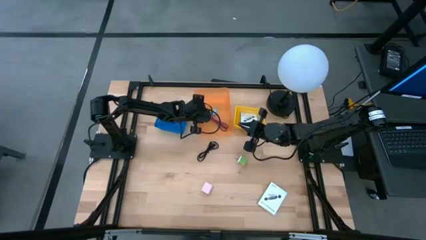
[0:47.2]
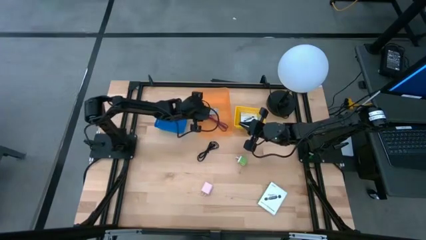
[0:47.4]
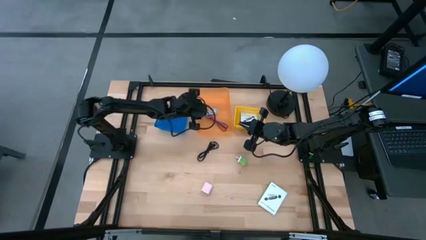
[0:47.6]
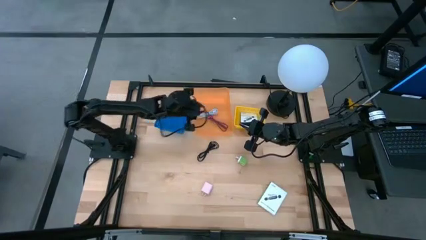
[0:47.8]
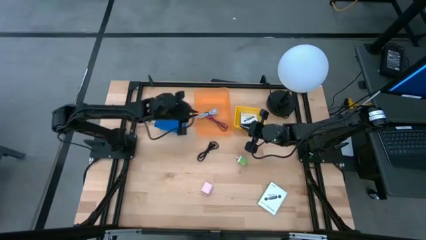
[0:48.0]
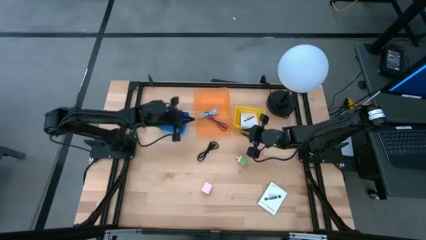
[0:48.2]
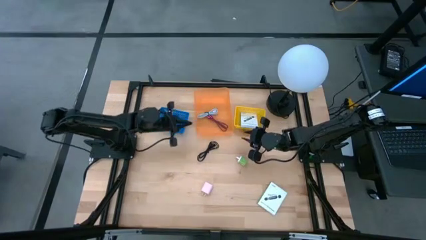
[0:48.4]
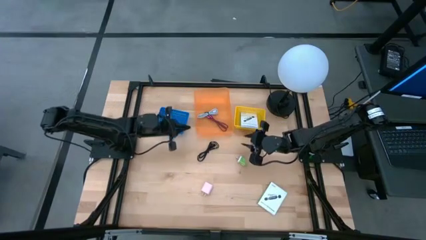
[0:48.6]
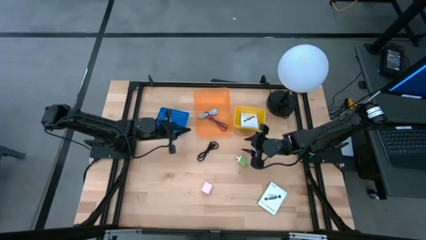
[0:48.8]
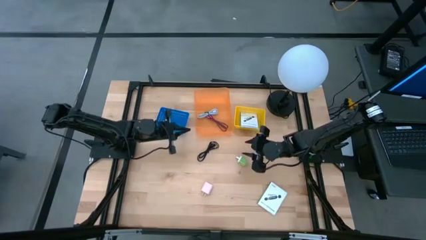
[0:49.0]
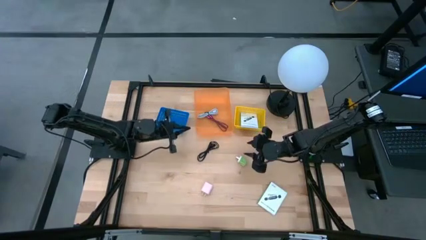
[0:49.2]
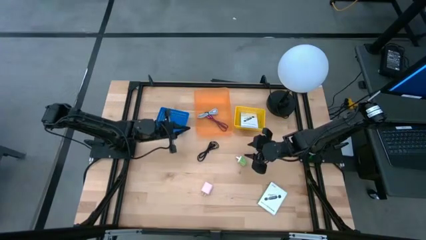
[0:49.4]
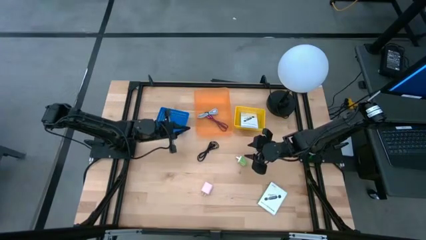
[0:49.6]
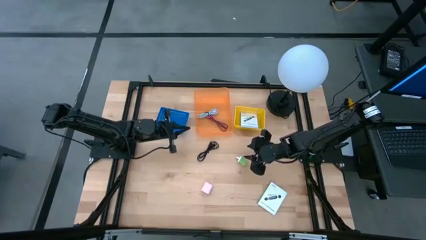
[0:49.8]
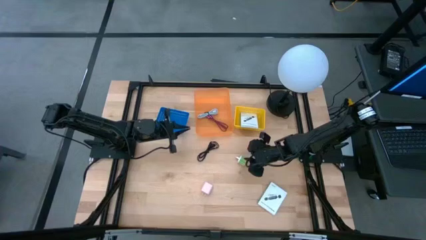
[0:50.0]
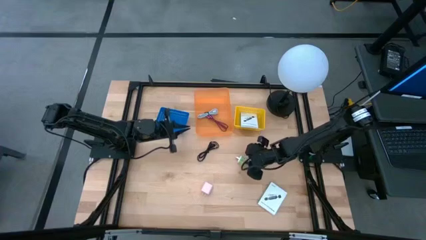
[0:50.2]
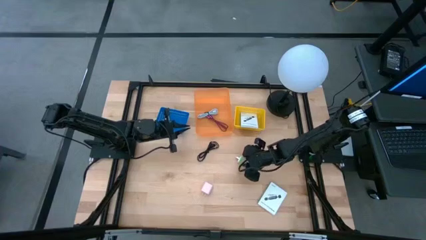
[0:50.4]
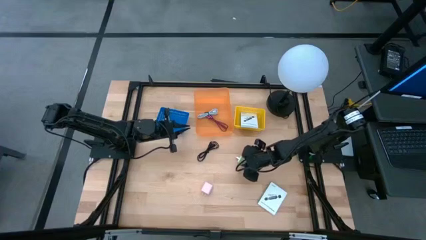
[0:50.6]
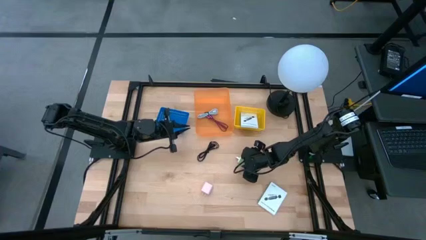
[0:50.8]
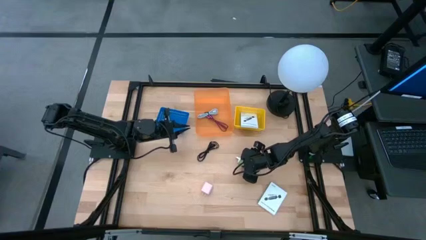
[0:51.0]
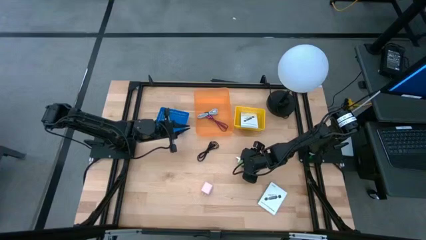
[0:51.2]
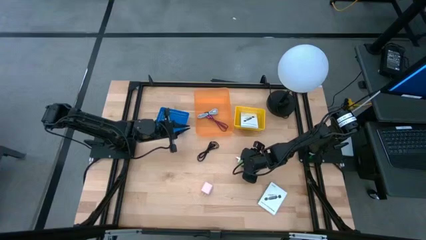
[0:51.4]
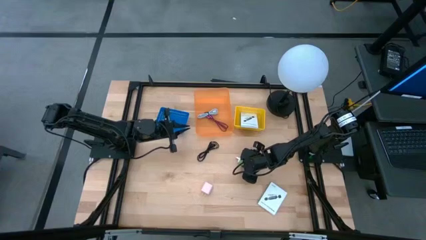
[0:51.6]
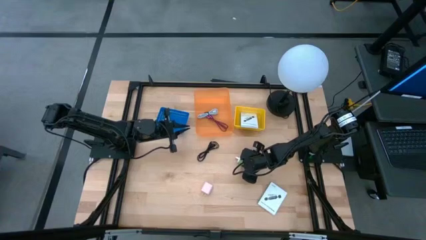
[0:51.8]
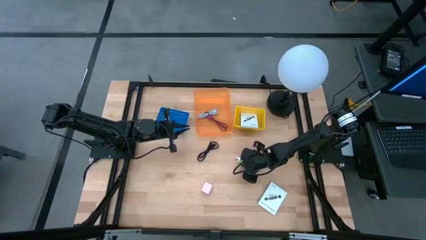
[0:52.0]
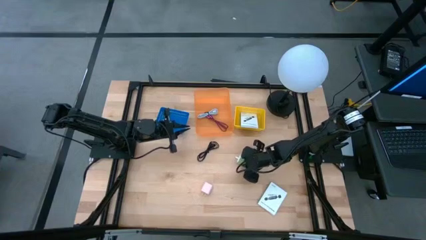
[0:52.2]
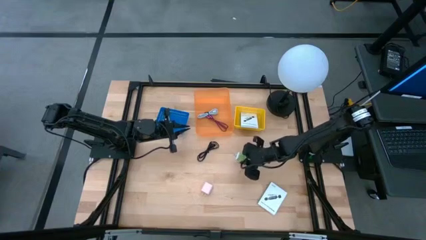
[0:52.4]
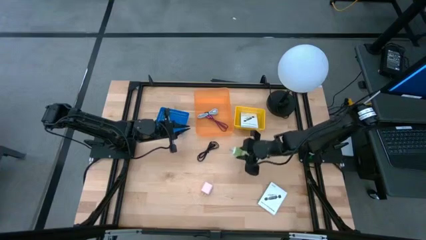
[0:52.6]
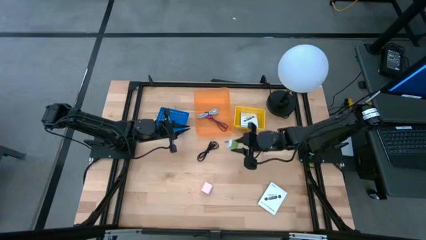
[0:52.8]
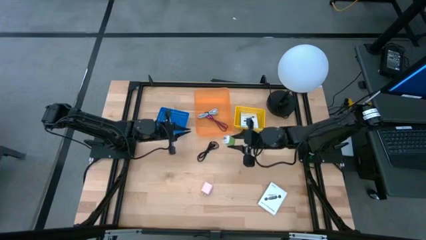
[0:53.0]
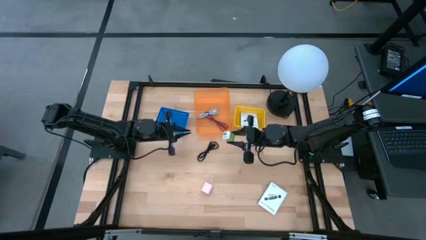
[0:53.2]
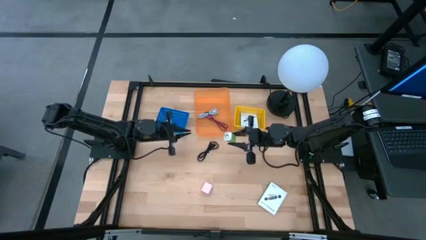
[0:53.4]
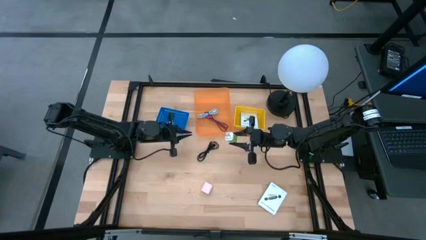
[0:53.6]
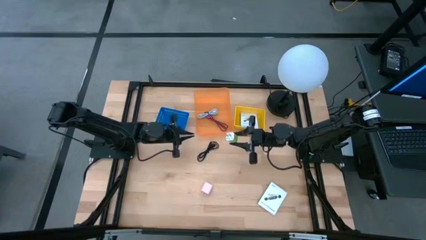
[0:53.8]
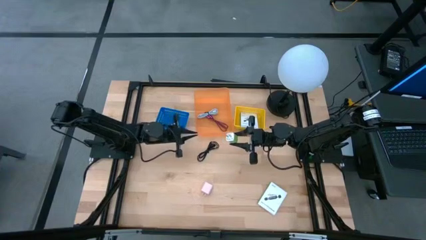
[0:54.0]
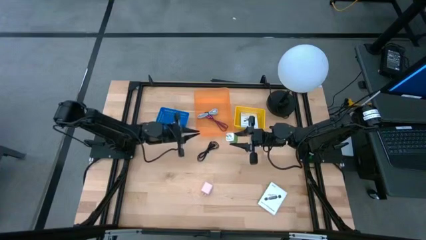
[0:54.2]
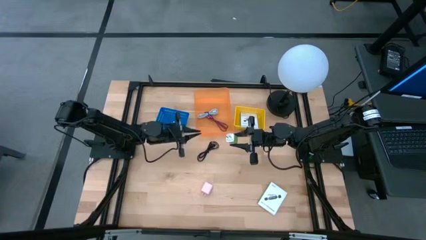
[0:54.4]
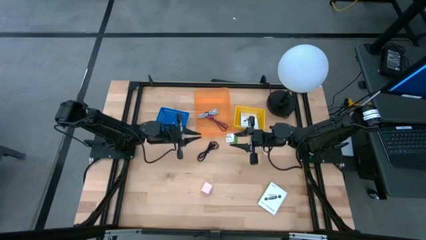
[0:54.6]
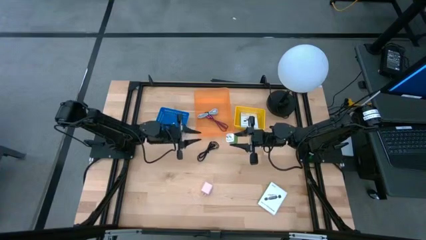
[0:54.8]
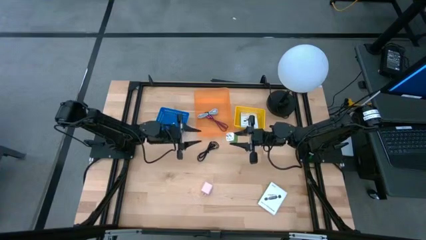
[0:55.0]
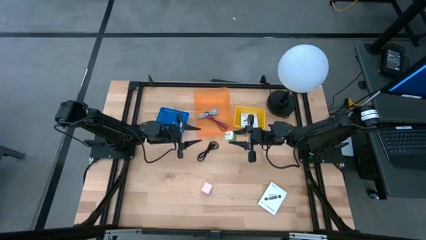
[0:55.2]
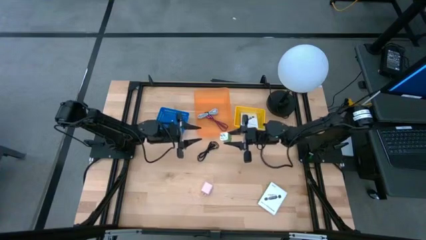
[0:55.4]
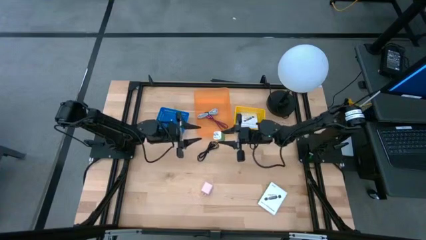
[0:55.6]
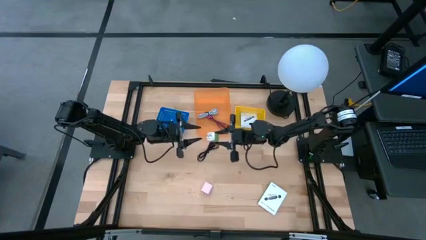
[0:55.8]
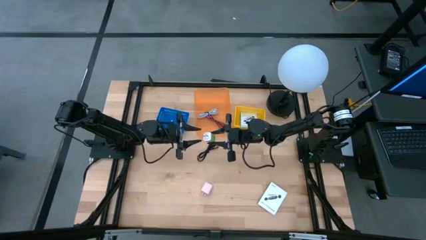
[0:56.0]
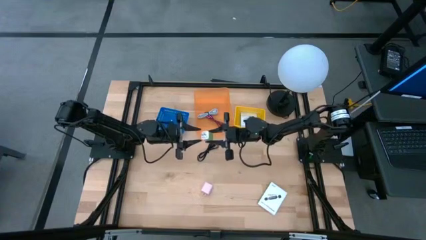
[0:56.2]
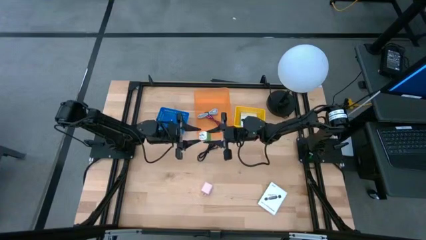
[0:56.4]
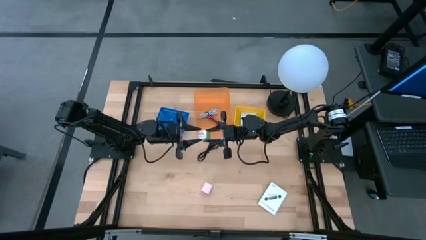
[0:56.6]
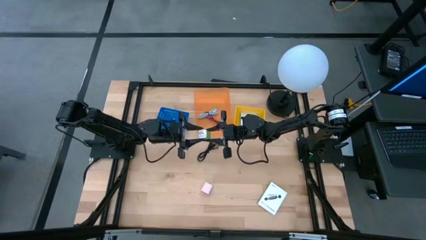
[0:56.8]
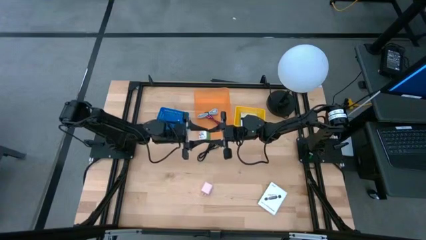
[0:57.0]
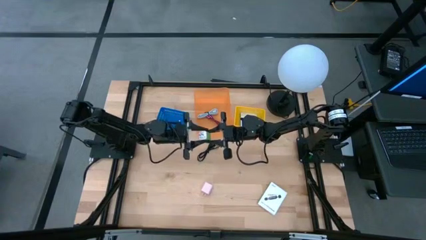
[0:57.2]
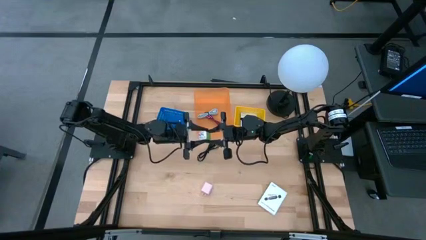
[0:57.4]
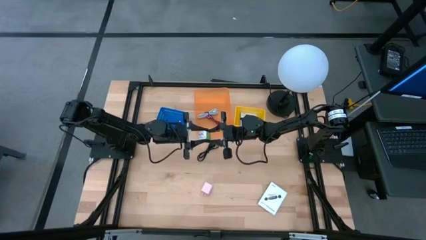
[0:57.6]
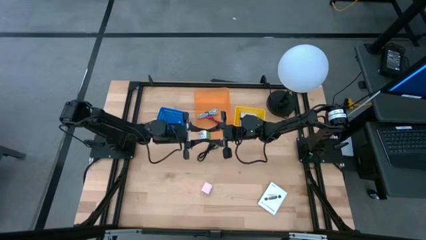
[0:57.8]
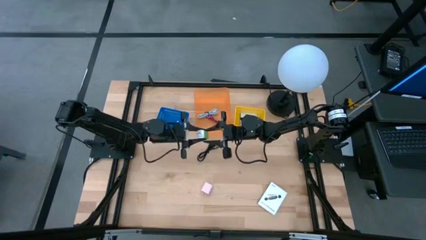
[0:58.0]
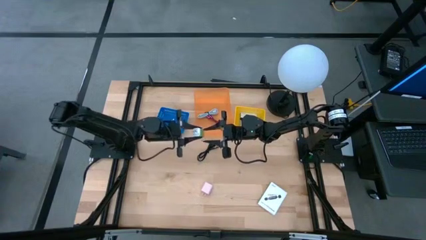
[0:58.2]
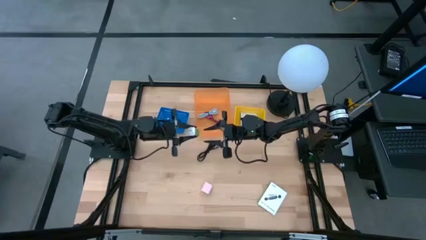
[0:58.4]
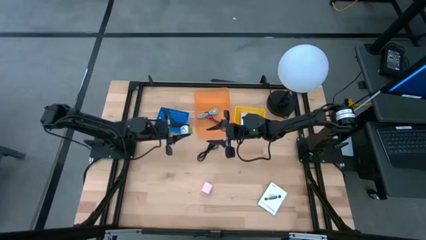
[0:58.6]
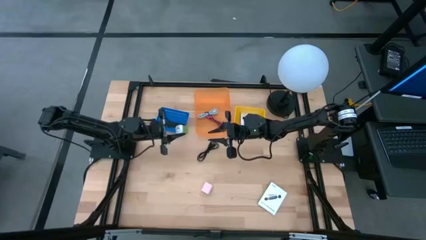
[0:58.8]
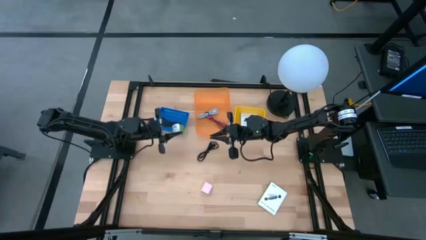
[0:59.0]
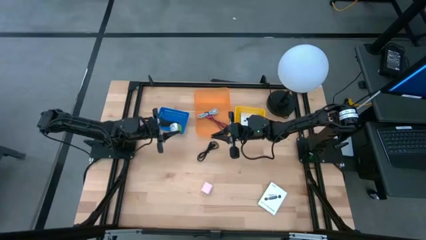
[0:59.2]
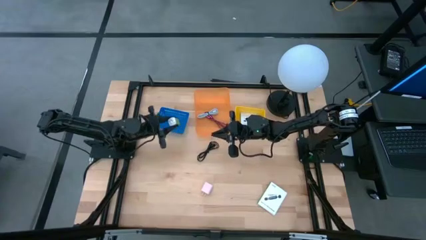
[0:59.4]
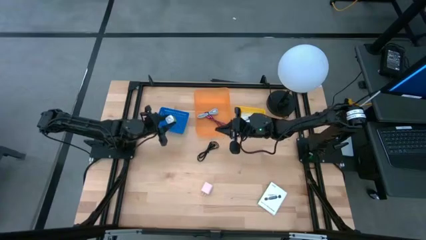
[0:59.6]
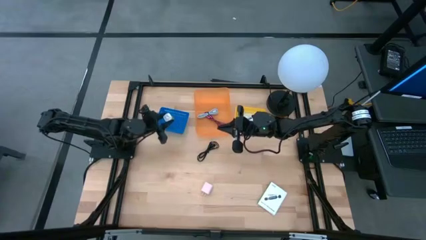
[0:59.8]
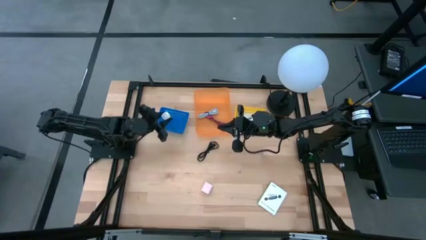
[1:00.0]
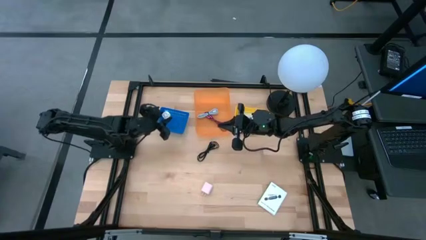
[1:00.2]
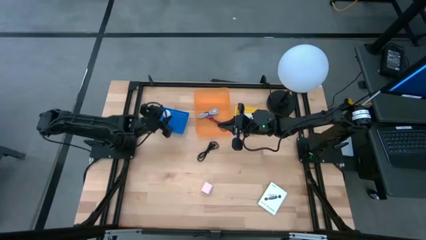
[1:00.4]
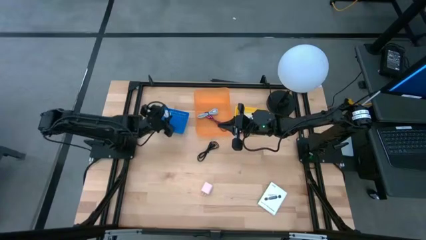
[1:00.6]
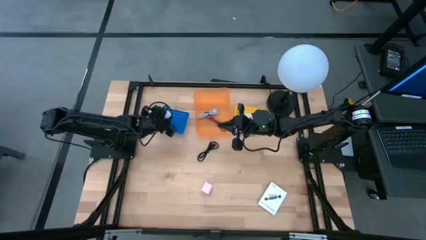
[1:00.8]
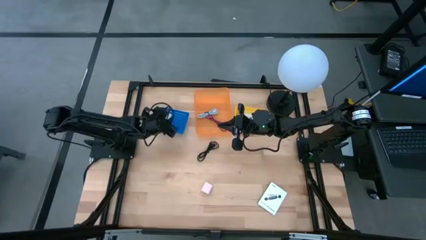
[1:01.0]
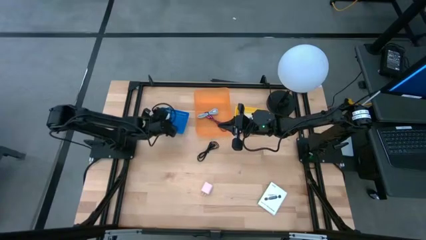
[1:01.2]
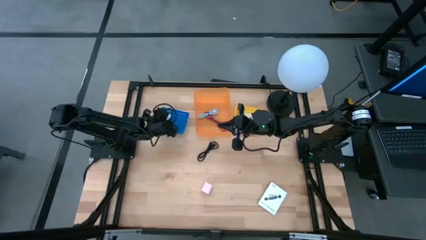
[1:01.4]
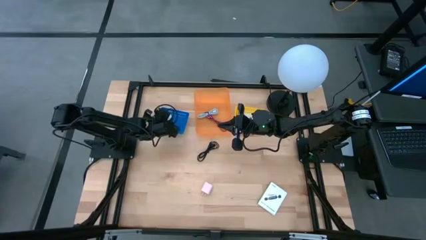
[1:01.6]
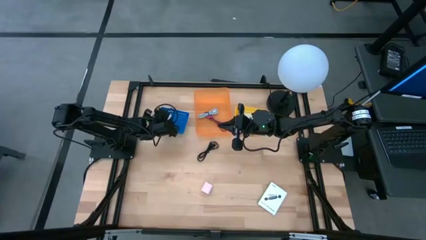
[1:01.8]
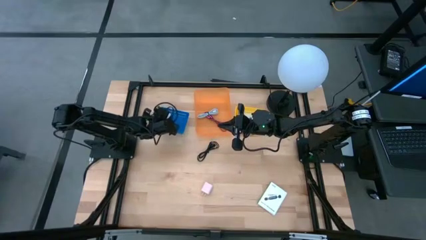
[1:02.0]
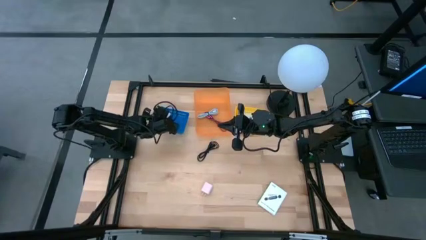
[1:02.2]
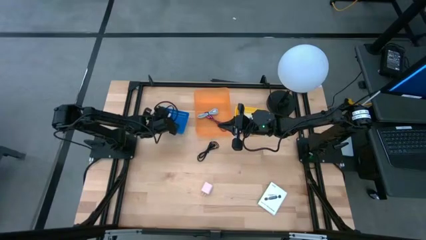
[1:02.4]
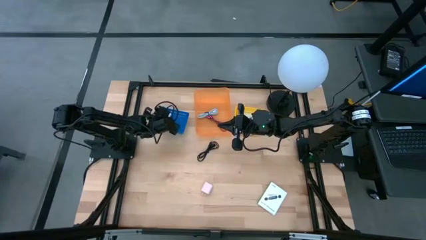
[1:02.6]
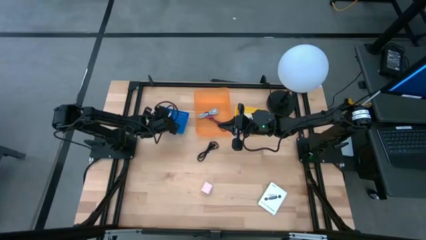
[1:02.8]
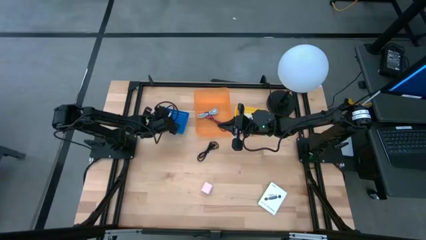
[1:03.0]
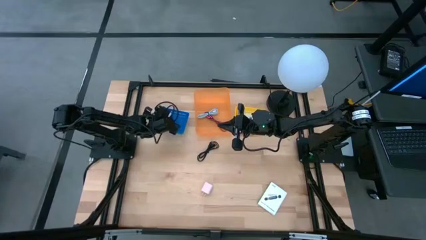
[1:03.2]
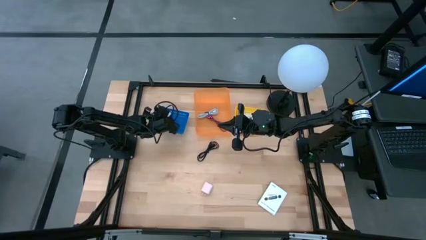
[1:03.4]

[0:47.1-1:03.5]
Task: Pick and place items into bin
Put the green charger adapter into the blue bin
